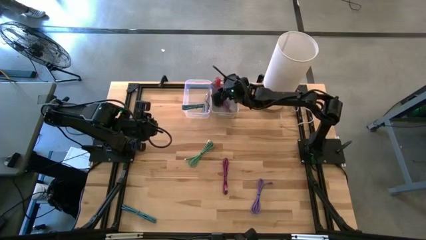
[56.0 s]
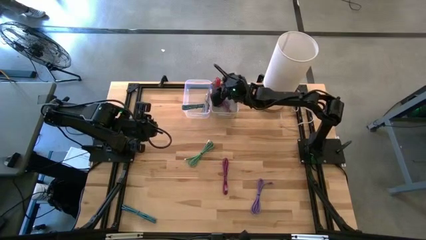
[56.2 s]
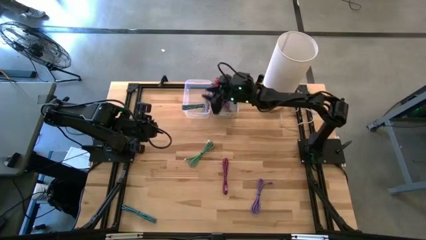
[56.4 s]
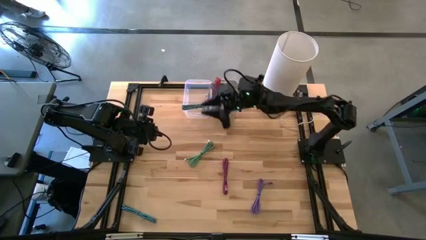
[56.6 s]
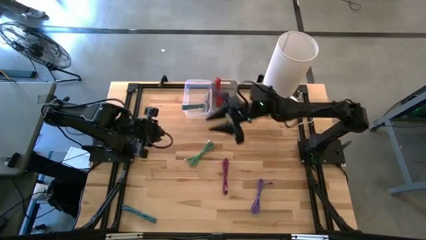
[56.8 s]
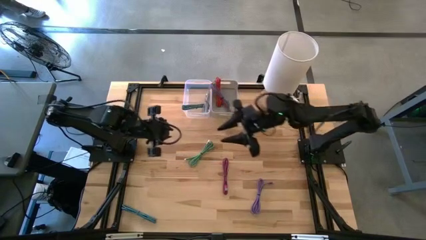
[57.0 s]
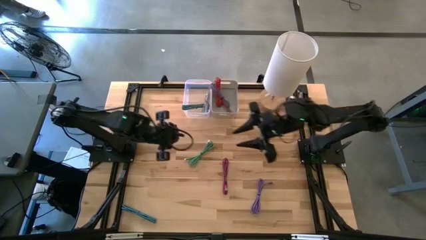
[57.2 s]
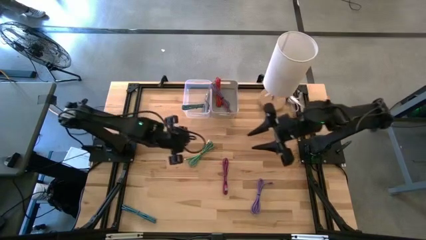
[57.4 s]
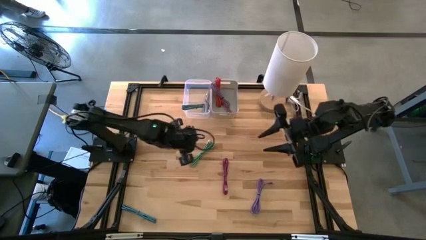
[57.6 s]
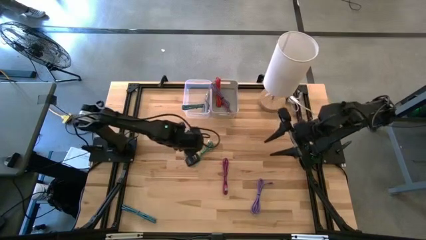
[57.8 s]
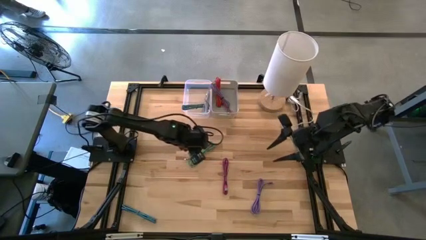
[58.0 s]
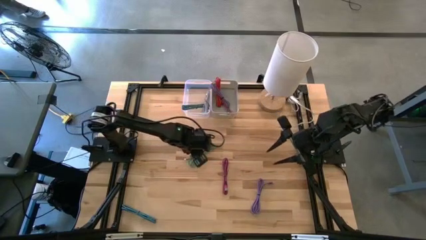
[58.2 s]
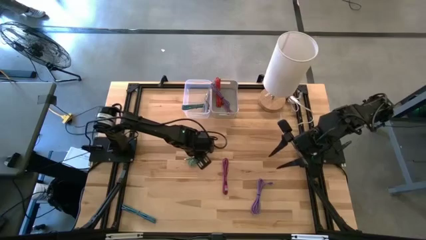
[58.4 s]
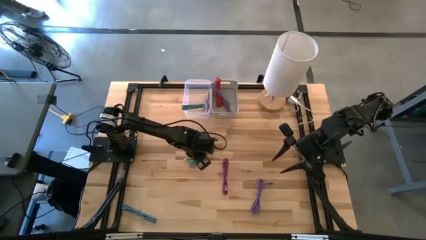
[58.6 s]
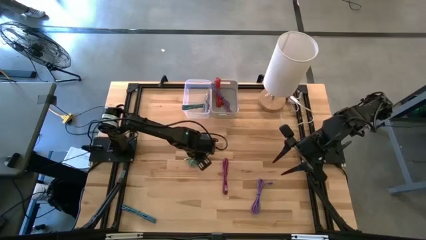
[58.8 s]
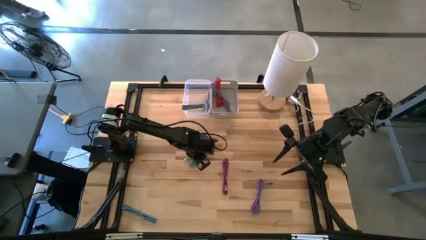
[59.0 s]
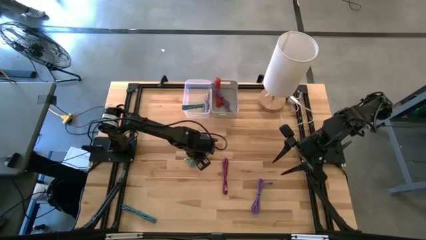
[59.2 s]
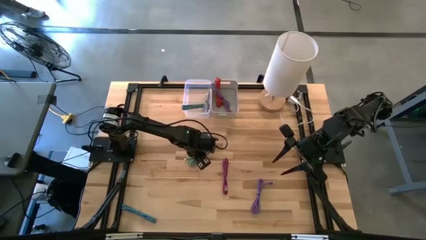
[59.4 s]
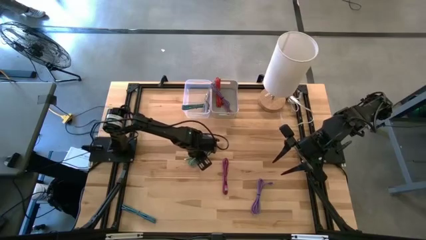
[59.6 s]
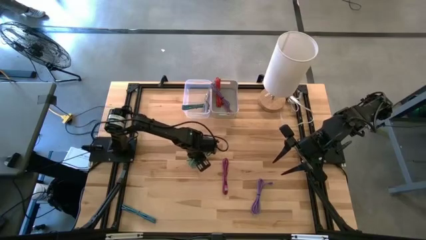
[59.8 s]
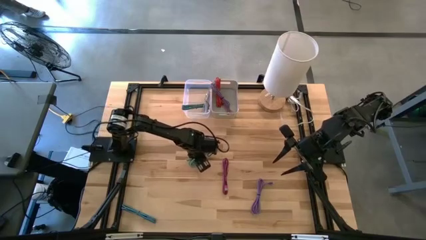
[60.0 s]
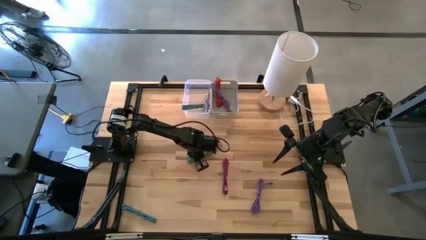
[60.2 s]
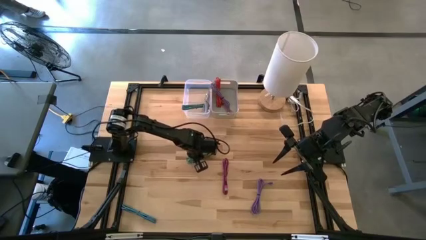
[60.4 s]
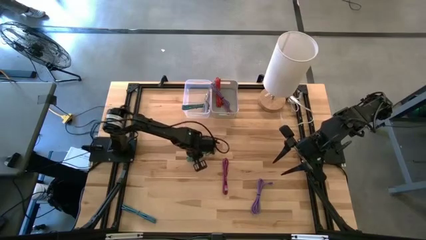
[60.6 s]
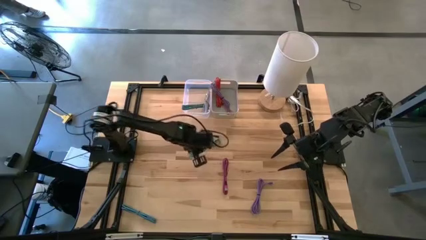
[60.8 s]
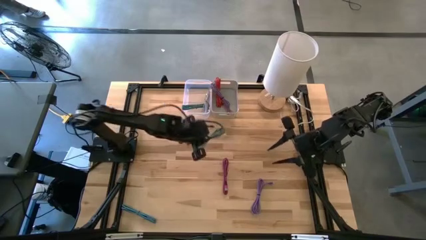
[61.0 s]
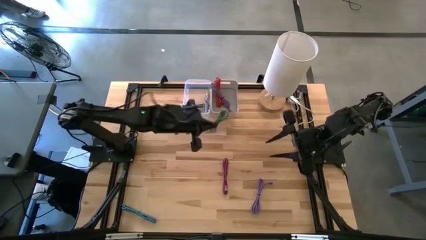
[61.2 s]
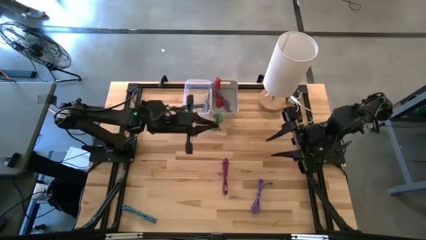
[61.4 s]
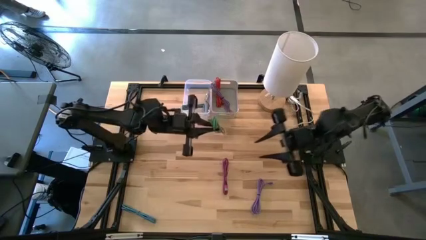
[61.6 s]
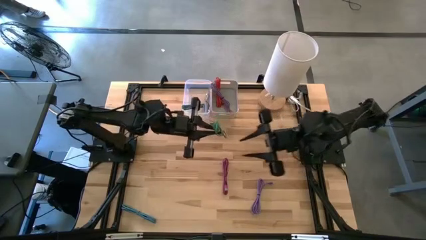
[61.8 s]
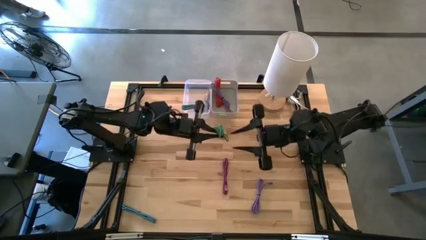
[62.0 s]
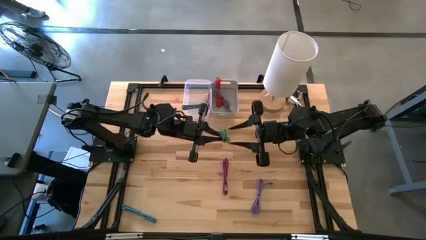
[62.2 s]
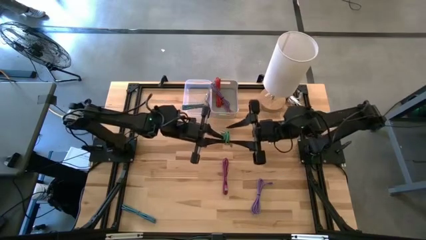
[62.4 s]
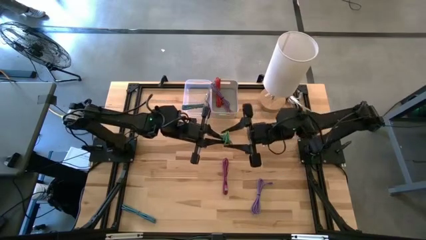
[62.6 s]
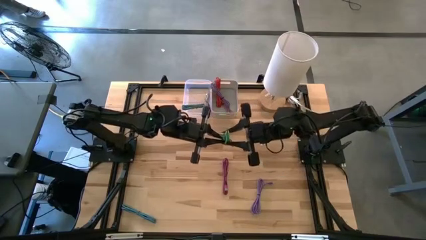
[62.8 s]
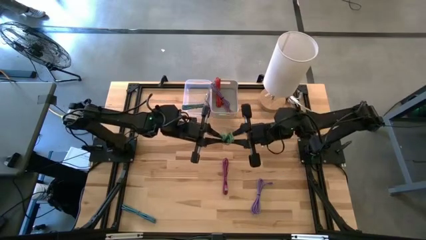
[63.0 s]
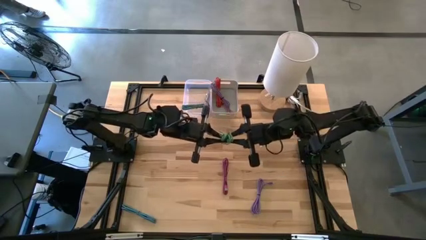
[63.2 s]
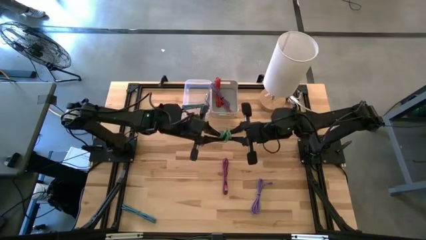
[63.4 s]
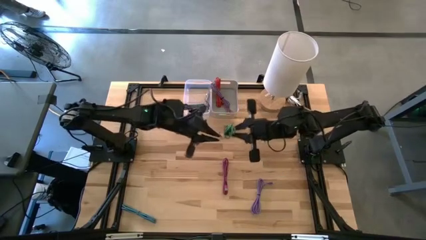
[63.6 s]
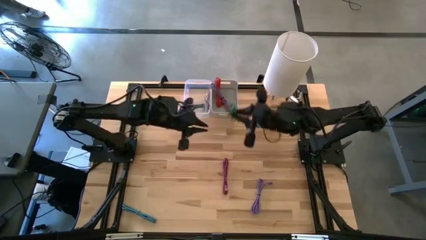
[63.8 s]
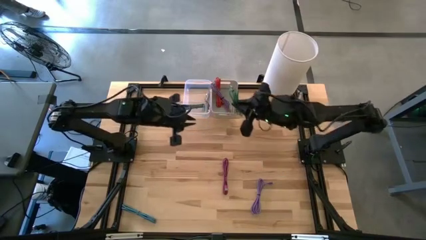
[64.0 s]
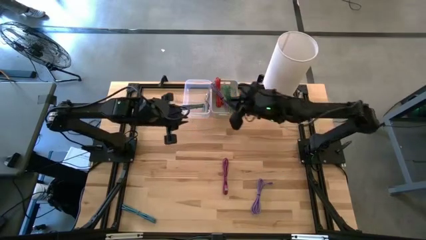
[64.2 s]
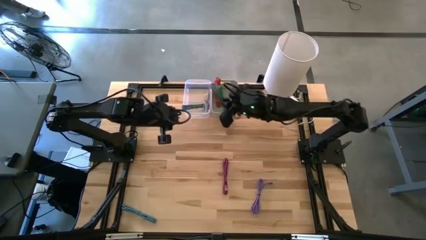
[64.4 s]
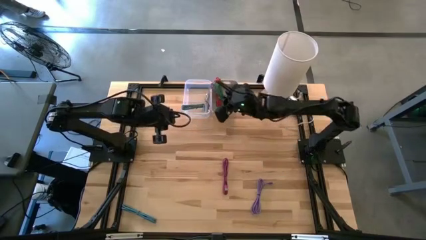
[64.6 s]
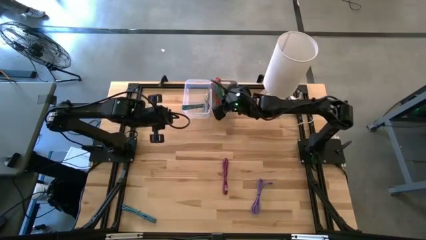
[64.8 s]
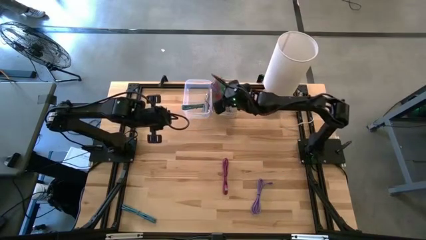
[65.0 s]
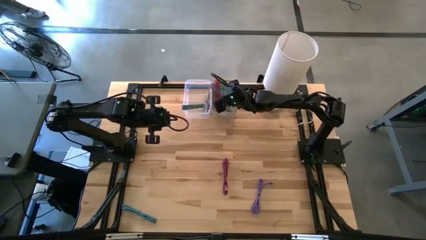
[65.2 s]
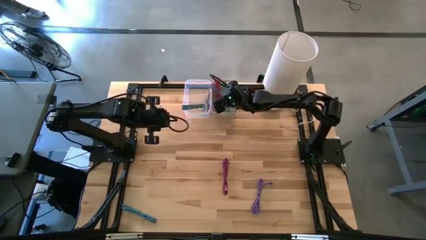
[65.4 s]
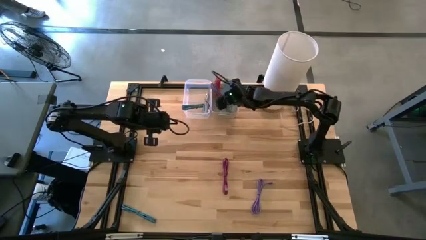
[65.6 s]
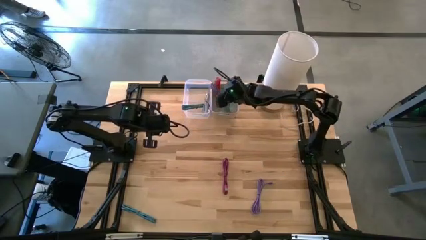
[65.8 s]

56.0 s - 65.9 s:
Task: Pick & Place USB Port
Put the green charger cable into the gray bin

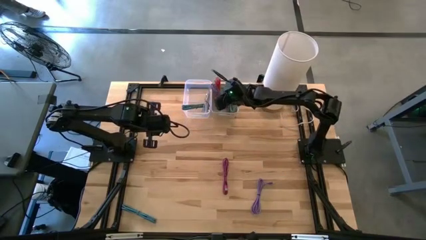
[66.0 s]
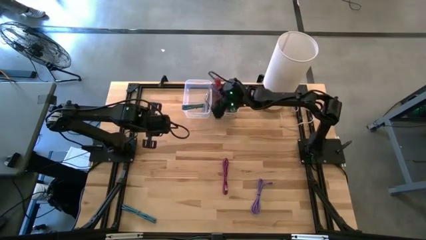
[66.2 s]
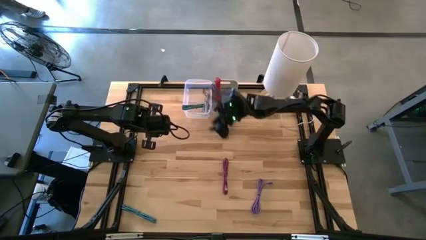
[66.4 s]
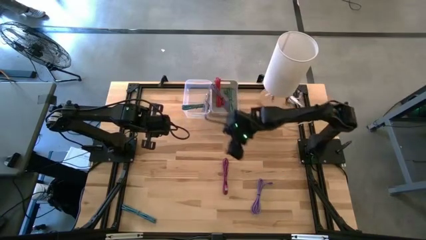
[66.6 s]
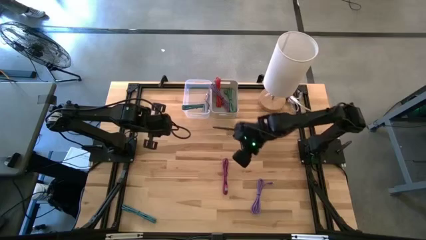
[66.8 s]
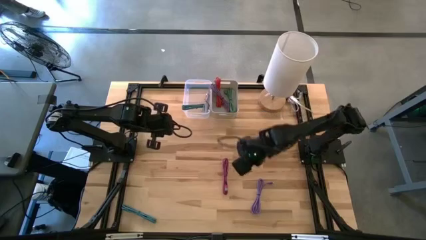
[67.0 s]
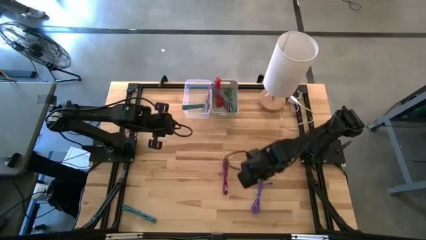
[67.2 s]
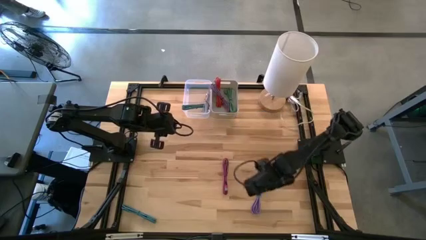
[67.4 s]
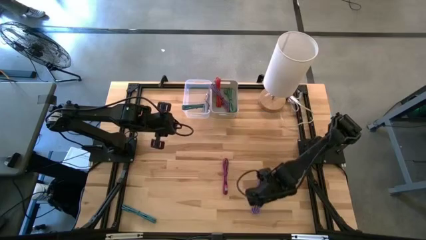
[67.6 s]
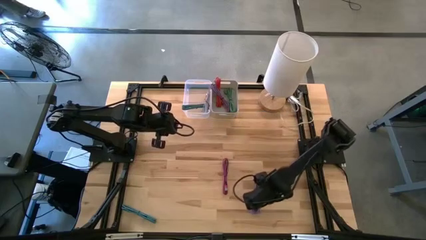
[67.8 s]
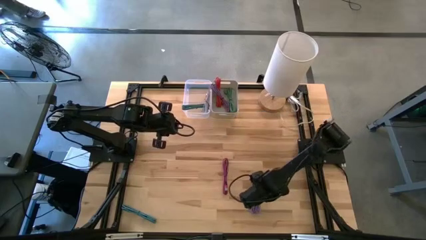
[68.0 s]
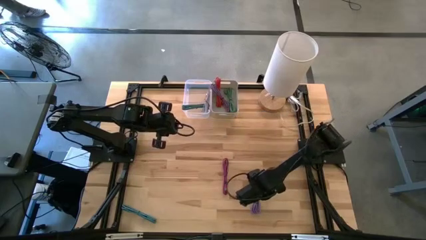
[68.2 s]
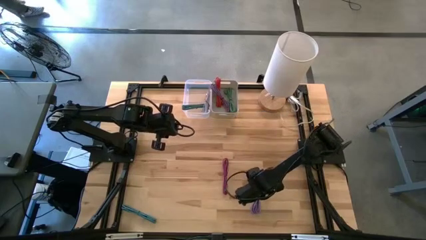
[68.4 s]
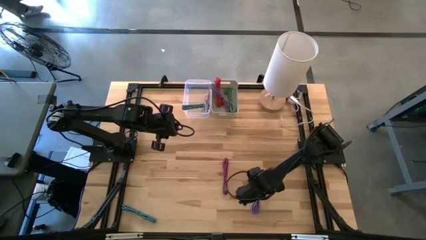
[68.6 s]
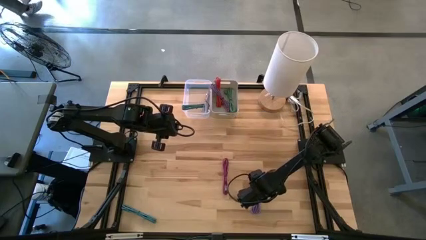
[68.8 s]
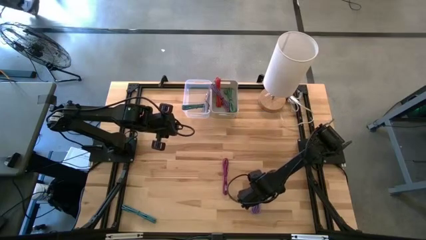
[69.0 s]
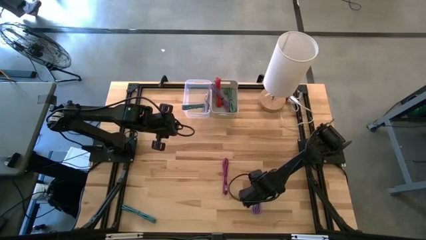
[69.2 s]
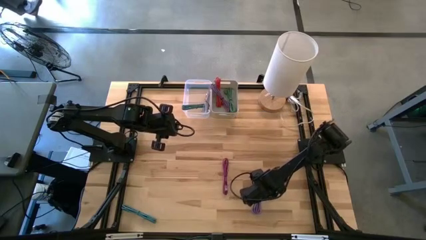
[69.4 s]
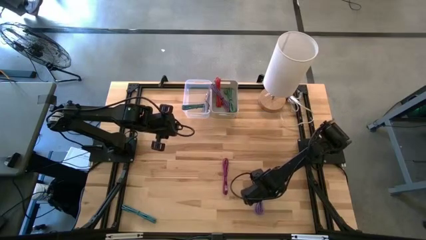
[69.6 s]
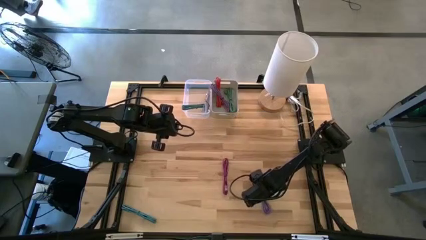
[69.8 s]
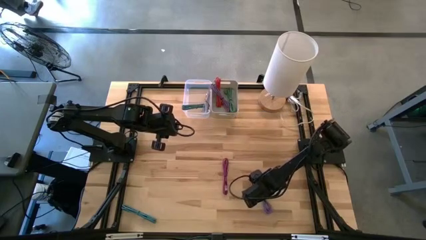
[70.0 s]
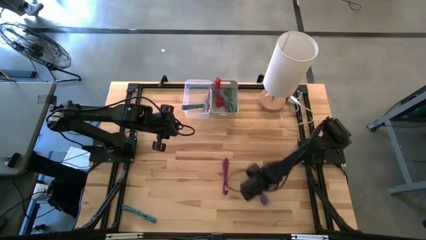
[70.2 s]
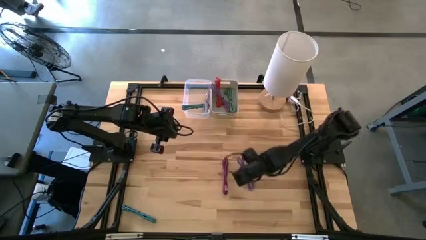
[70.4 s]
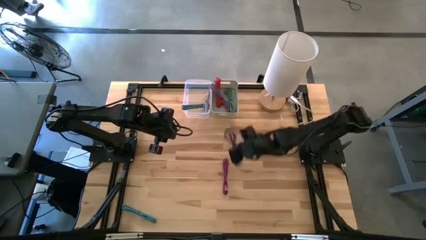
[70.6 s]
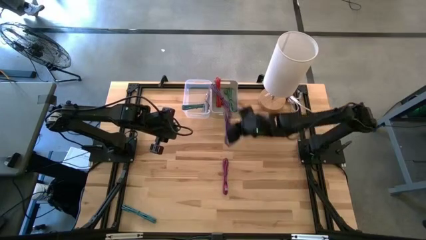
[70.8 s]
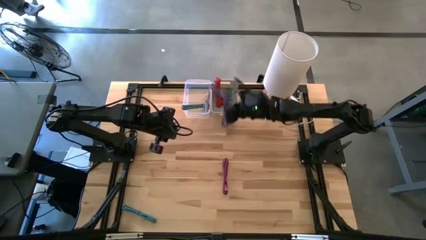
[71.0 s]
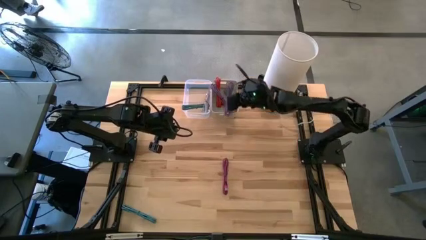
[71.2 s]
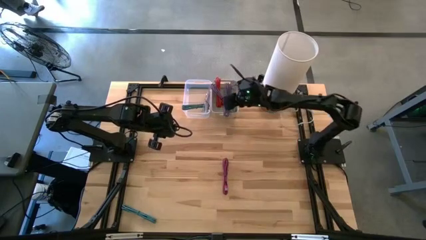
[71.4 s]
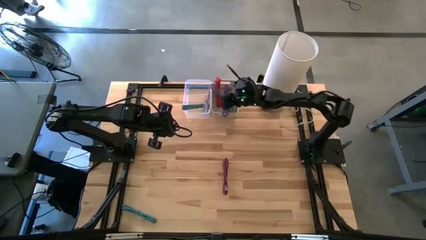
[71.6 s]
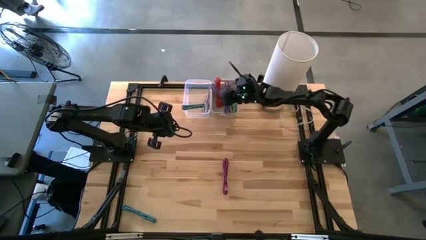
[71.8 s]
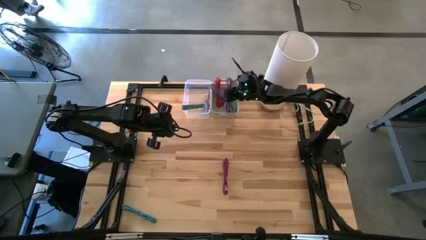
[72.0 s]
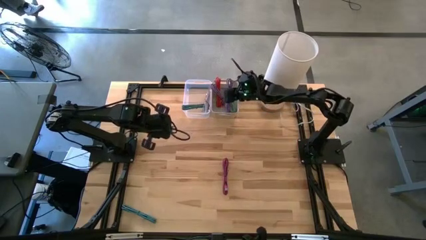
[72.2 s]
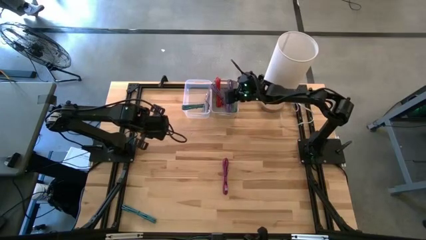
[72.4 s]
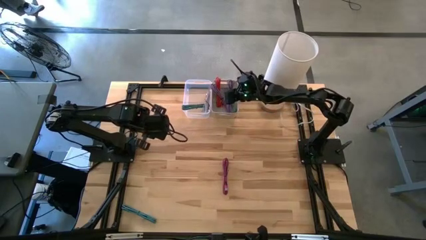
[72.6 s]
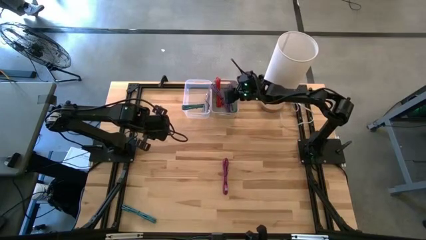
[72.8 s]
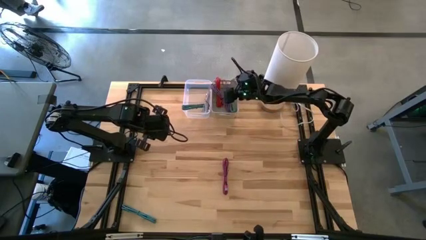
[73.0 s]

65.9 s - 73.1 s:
Put the purple charger cable into the gray bin
